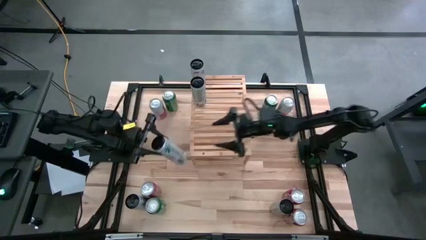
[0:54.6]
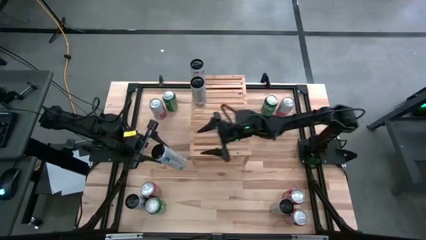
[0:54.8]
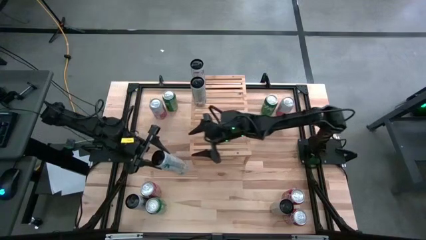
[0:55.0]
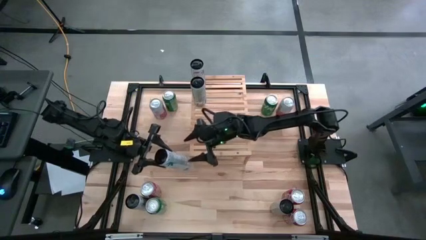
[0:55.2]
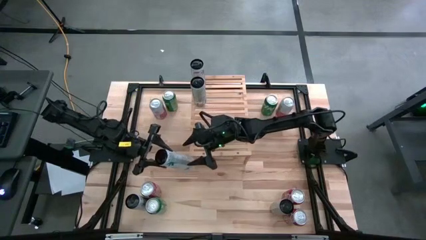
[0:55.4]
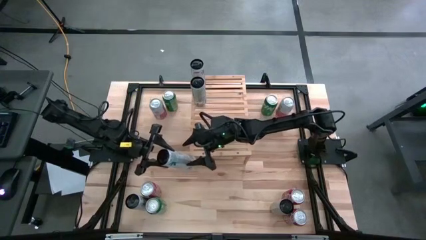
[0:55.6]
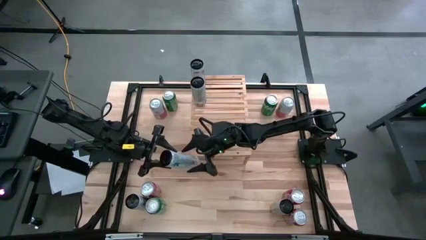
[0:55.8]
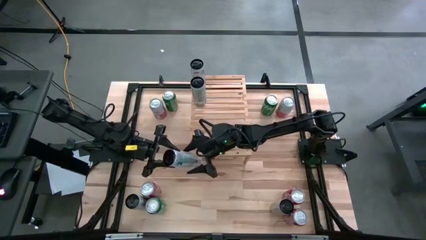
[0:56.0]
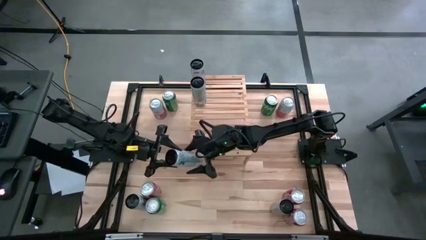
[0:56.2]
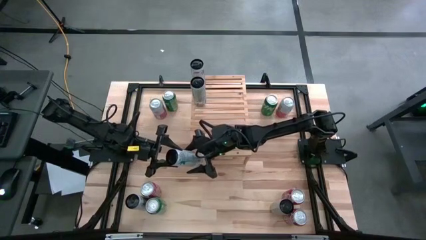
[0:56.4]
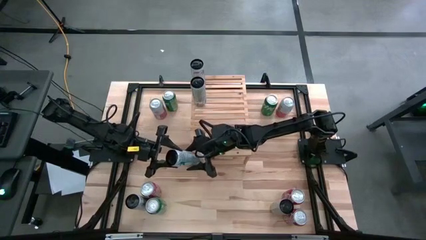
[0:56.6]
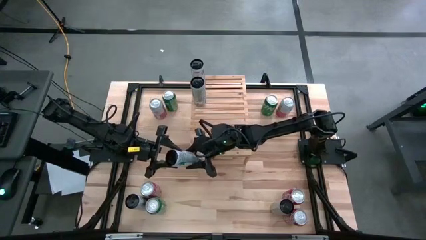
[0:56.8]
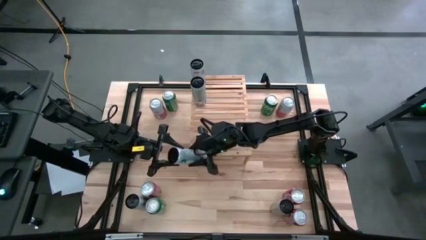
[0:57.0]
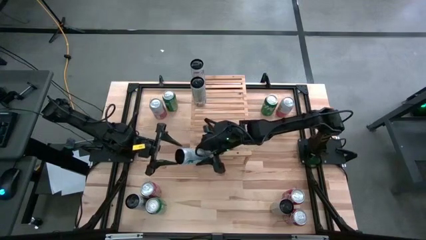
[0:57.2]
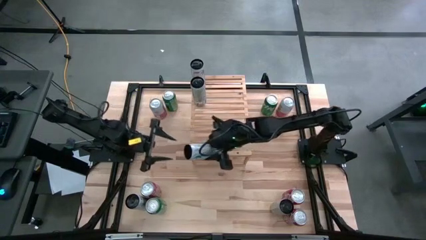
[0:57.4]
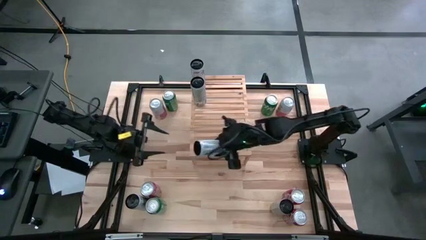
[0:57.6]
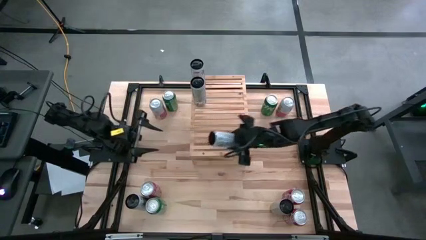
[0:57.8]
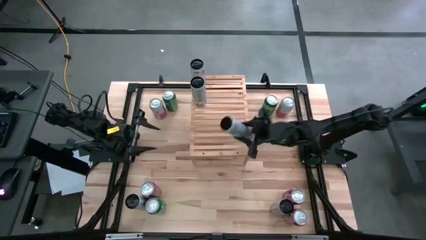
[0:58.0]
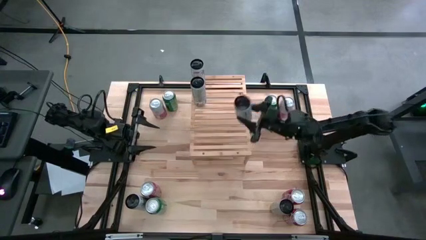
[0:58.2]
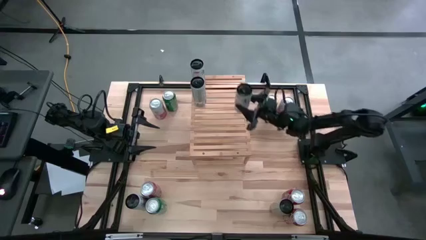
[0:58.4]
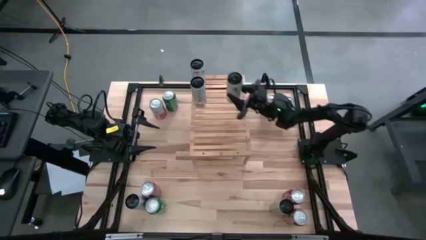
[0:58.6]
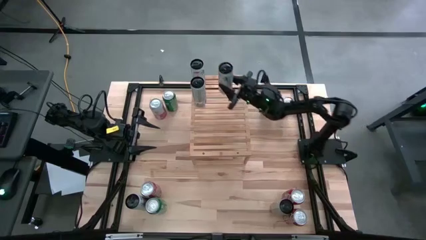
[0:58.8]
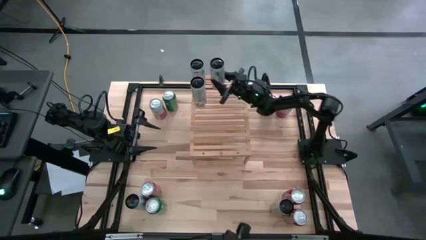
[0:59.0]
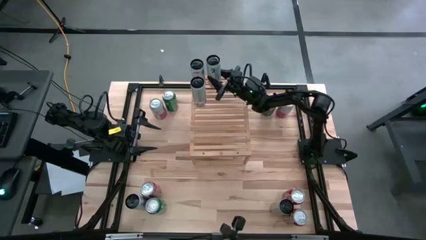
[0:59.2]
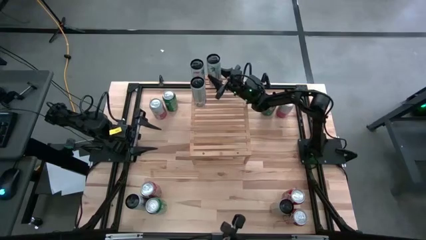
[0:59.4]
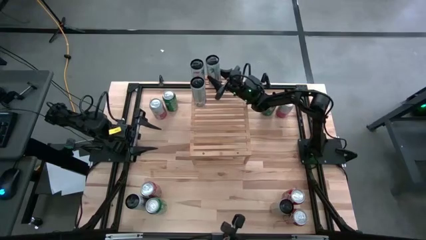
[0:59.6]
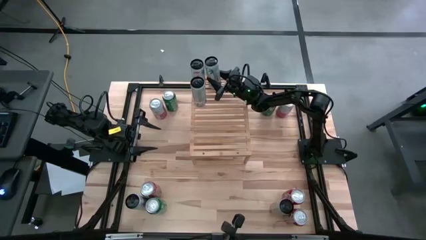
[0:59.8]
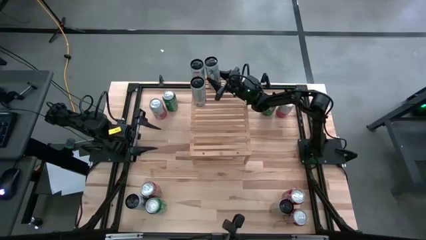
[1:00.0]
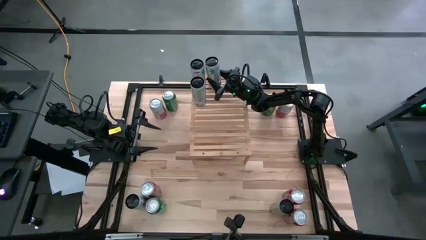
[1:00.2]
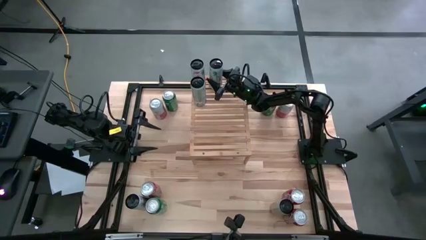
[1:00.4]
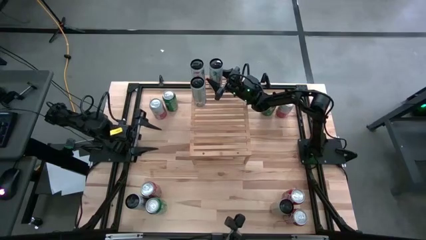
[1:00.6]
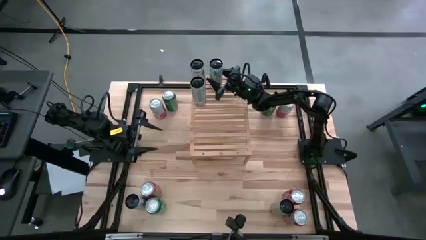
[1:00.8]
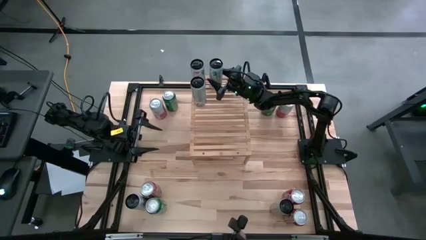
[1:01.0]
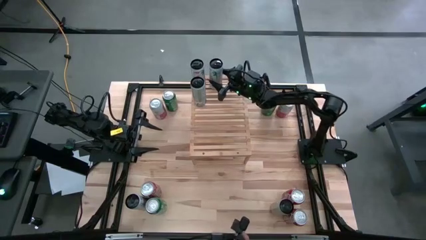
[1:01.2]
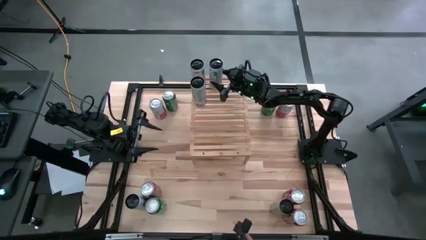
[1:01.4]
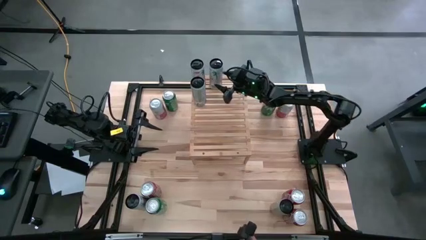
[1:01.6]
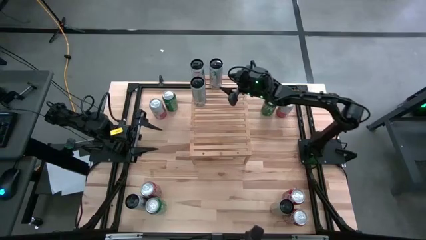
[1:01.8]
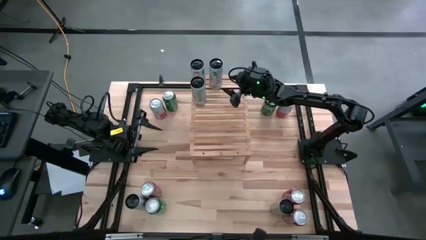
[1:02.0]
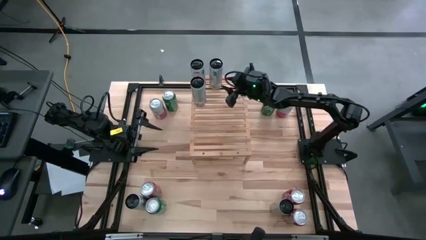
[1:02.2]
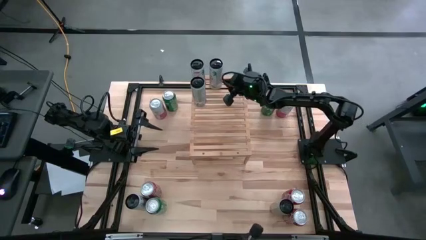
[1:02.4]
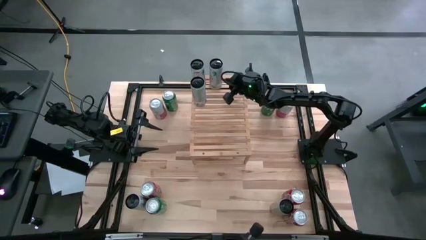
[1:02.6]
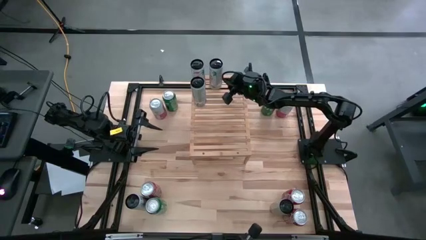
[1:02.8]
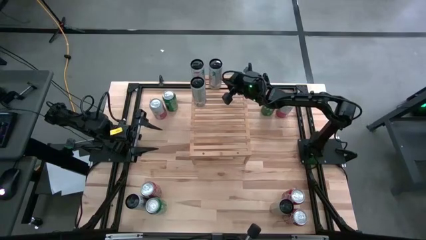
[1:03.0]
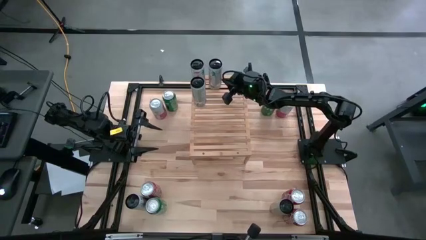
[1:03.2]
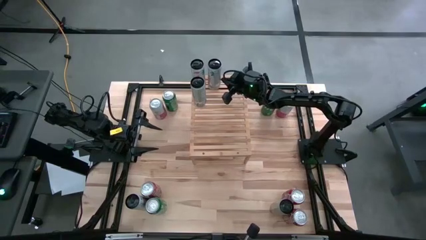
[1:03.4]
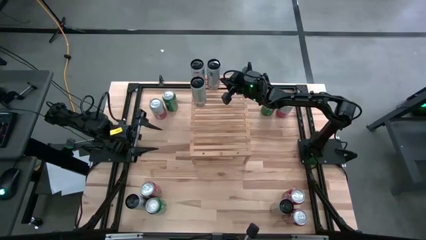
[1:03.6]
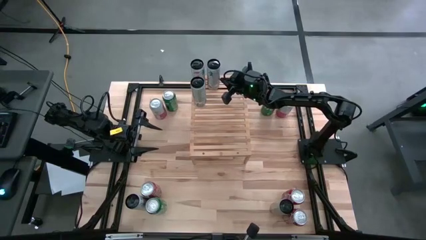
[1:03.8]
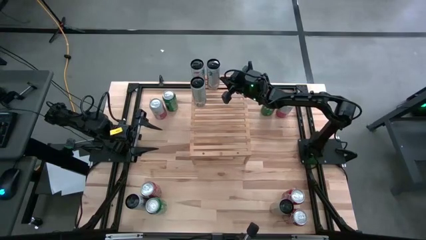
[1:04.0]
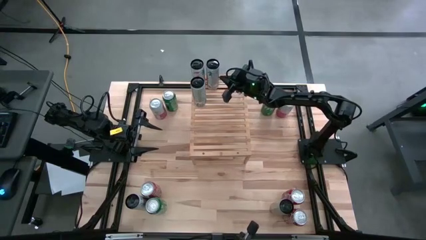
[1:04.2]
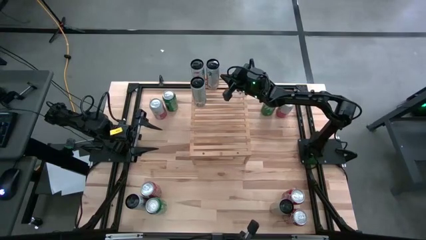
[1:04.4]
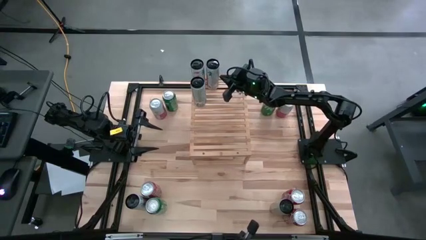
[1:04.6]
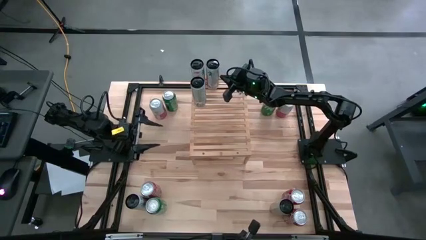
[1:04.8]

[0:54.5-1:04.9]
Task: Place canned beverage on shelf
Put the top white pink soda can aligned with the other white pink soda can on the shelf

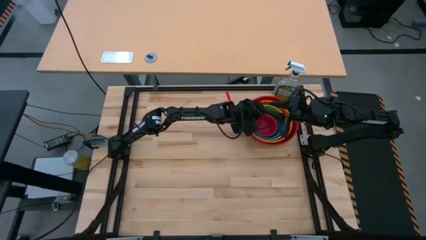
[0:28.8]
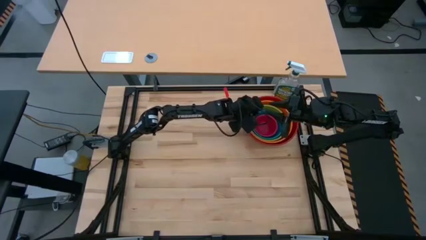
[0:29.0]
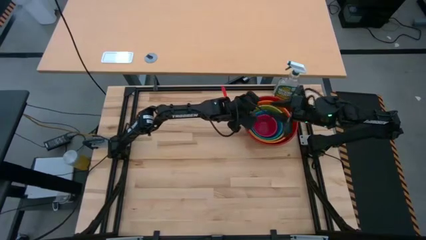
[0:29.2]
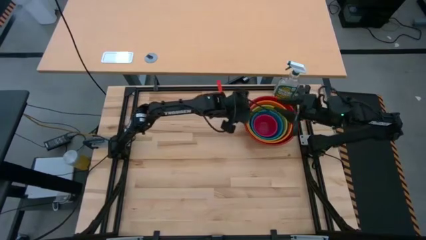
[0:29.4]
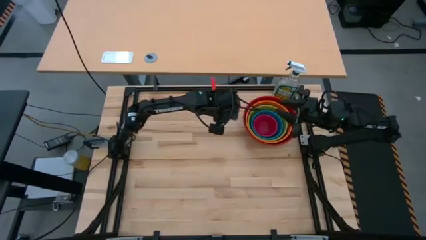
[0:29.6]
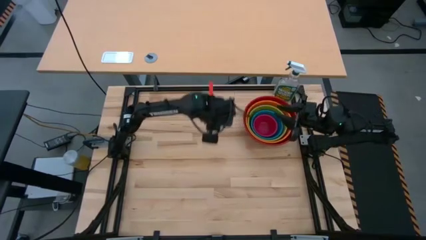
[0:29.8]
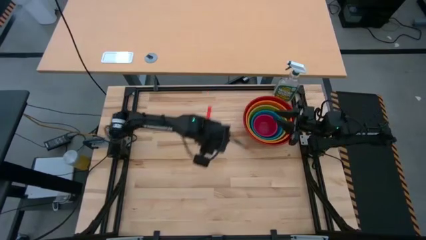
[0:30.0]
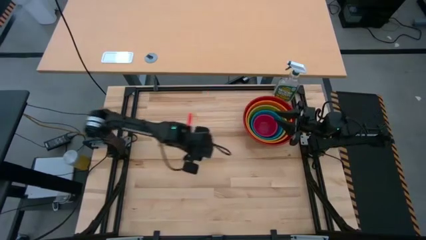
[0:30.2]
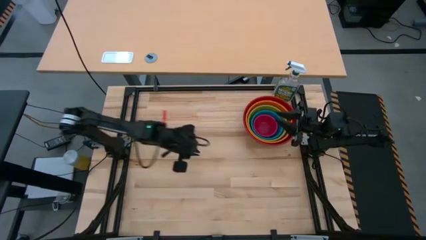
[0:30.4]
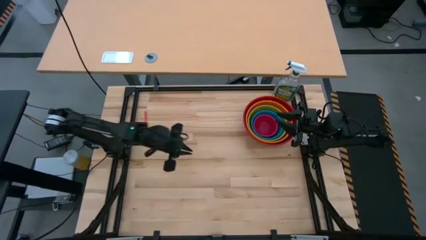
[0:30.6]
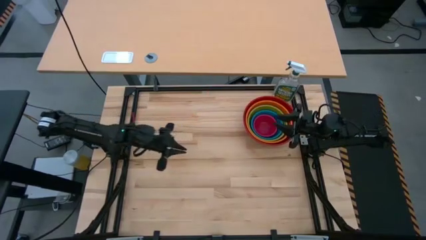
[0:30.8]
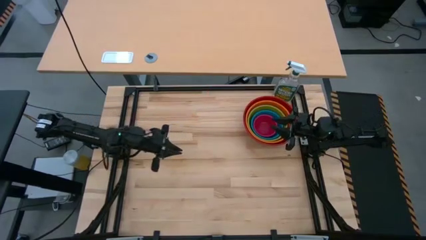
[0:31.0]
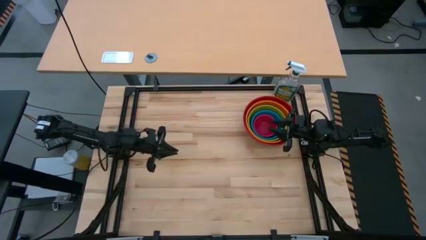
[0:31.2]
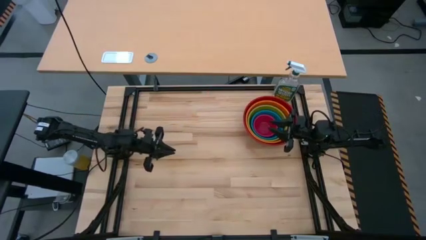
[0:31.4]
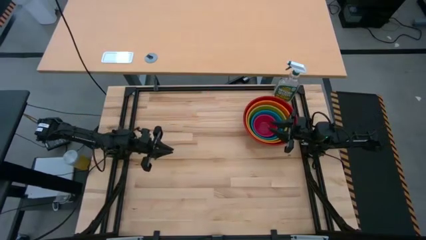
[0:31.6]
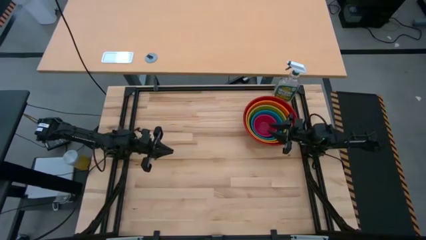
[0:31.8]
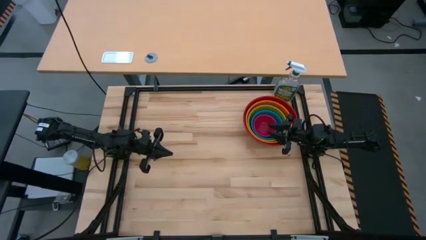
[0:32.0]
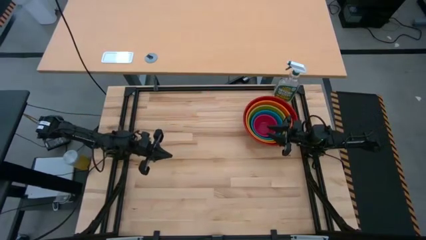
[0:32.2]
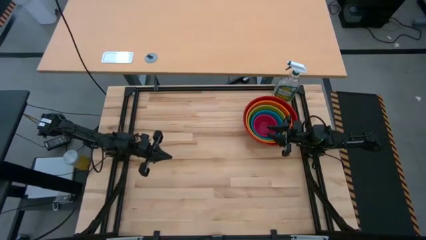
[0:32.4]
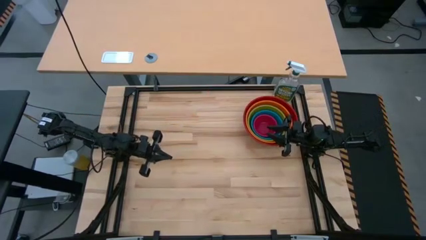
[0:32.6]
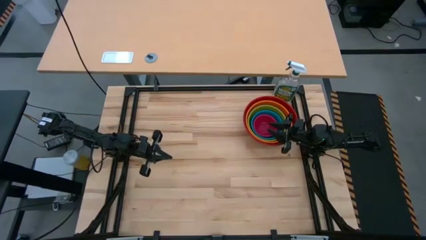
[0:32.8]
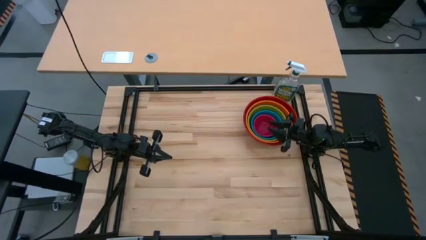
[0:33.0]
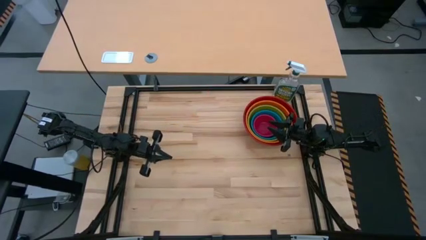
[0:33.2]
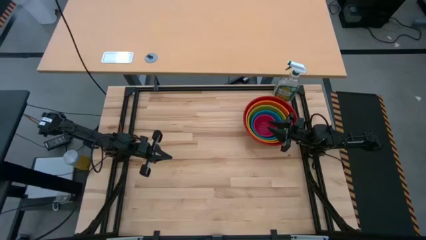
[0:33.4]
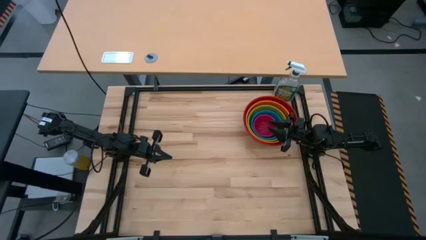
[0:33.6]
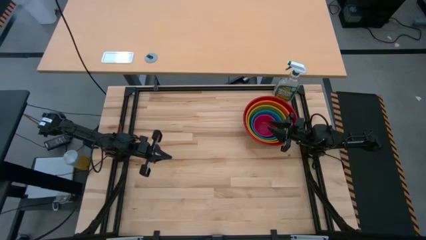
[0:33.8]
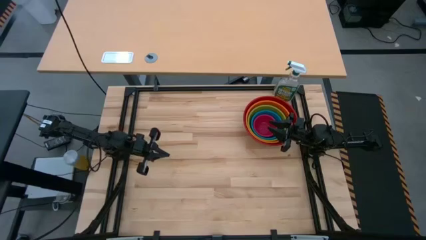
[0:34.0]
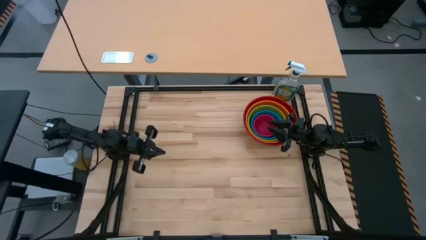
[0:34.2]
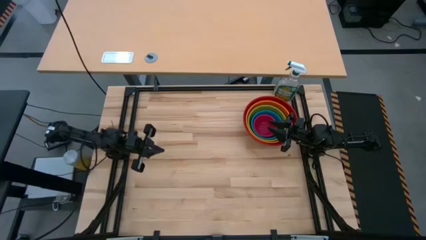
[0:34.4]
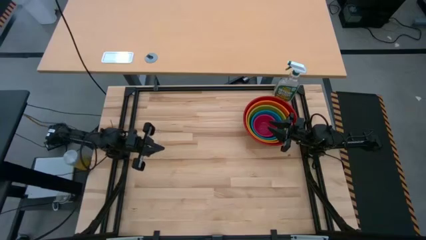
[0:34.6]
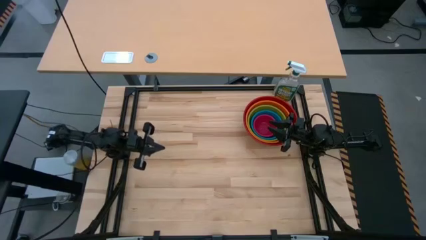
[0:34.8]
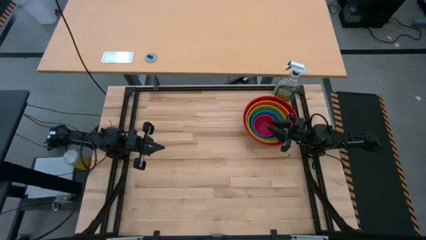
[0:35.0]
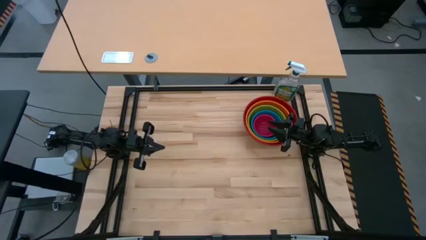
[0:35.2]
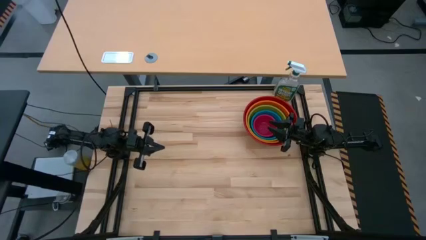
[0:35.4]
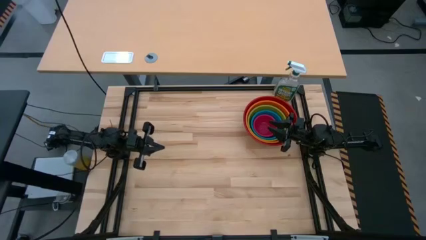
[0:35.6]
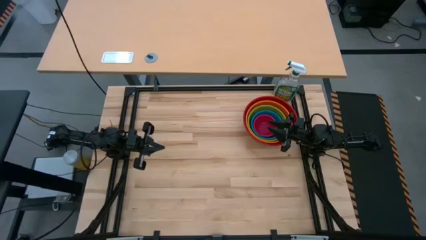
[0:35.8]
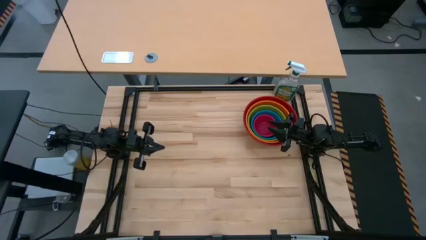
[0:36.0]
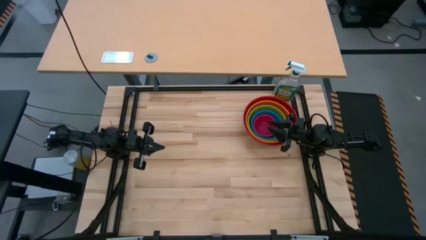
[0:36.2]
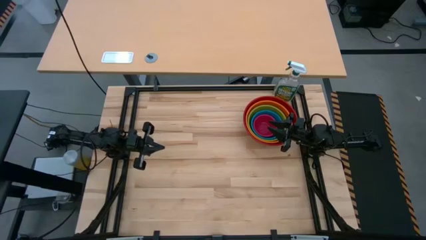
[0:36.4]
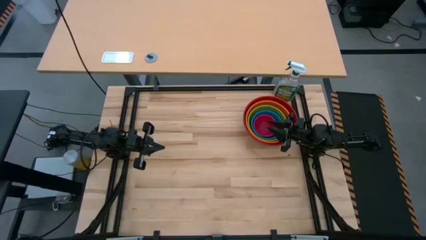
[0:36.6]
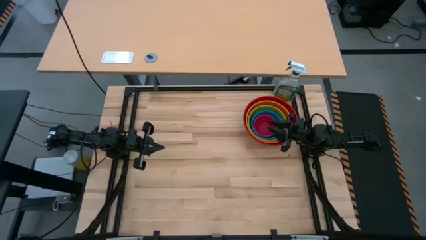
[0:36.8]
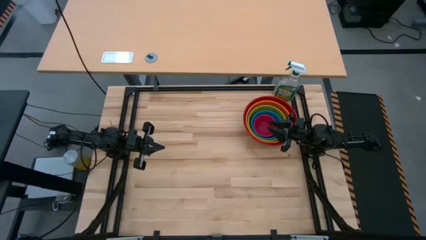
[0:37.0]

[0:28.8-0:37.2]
Task: Nest bowls inside each other by size order
Return to Home Position
